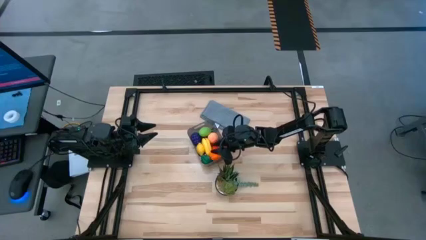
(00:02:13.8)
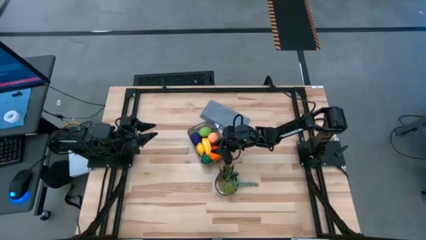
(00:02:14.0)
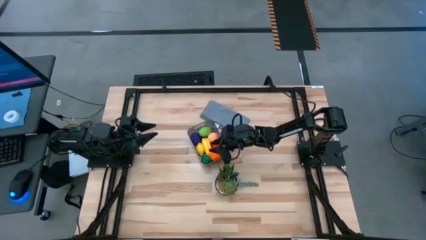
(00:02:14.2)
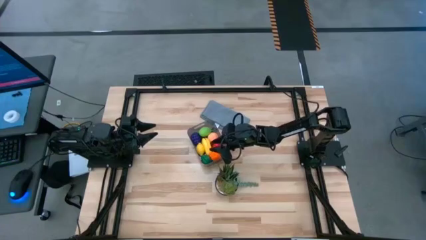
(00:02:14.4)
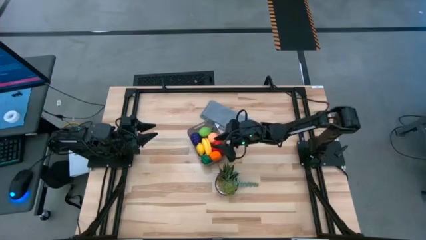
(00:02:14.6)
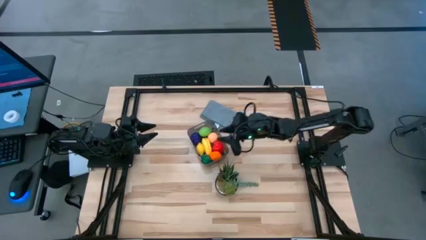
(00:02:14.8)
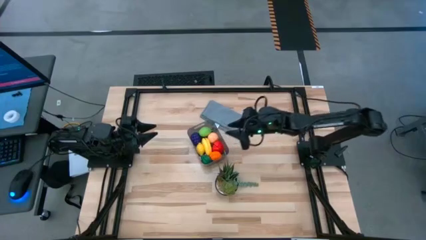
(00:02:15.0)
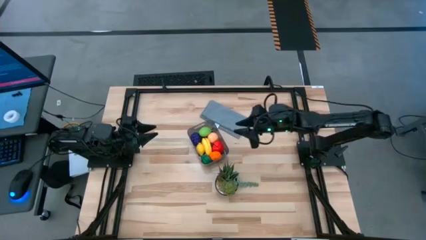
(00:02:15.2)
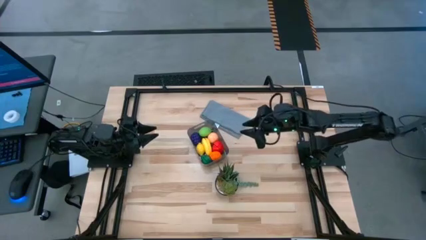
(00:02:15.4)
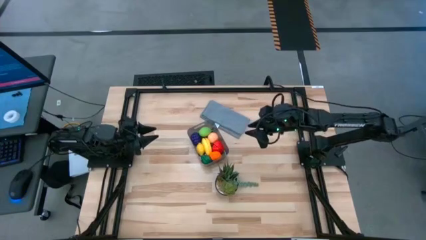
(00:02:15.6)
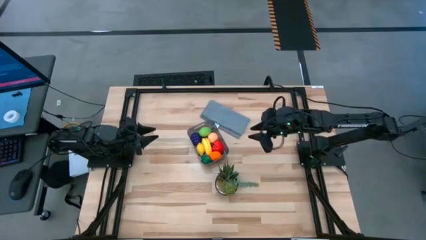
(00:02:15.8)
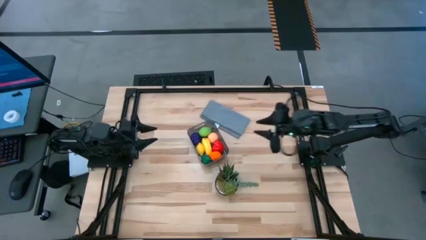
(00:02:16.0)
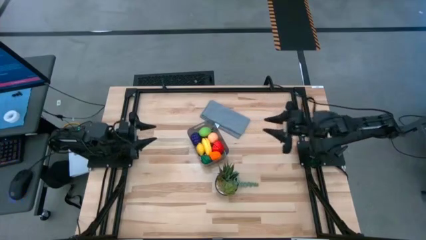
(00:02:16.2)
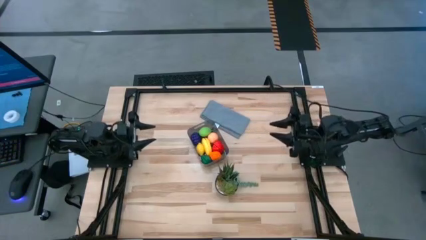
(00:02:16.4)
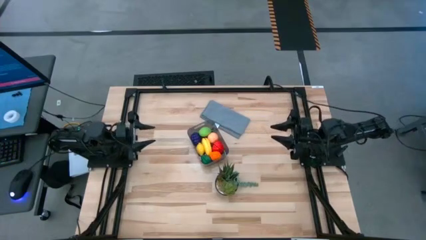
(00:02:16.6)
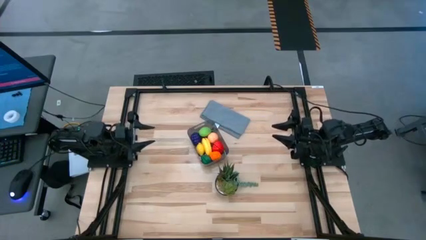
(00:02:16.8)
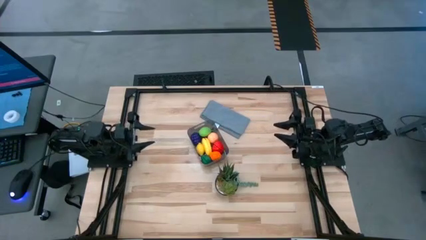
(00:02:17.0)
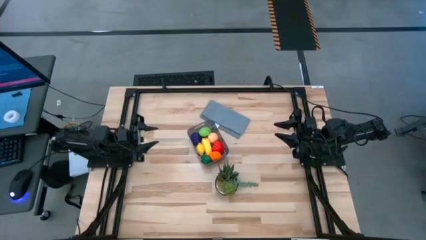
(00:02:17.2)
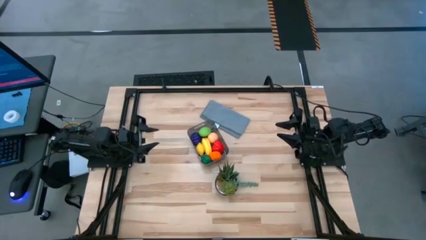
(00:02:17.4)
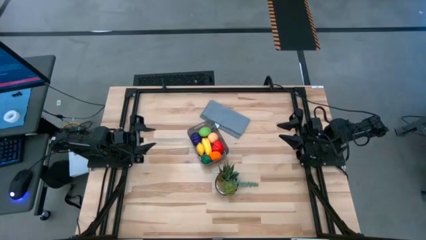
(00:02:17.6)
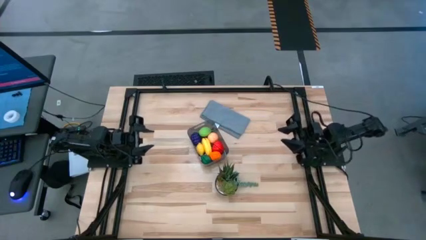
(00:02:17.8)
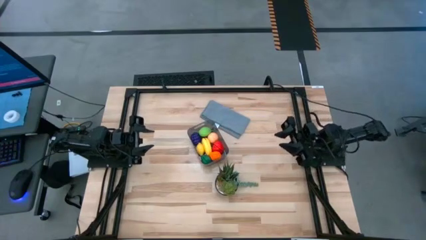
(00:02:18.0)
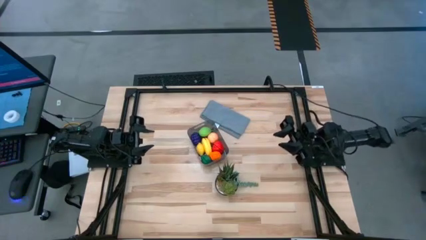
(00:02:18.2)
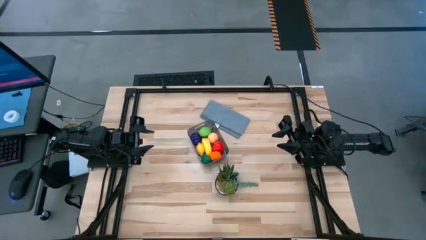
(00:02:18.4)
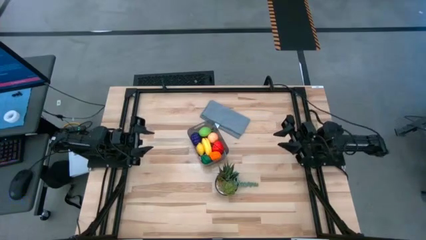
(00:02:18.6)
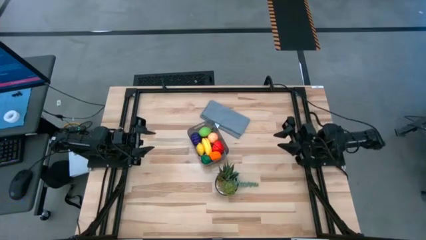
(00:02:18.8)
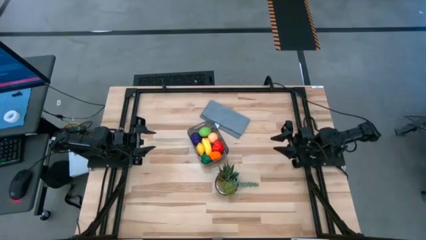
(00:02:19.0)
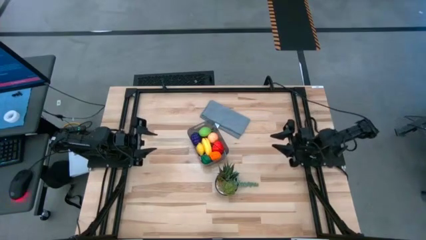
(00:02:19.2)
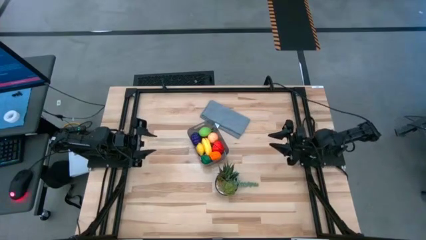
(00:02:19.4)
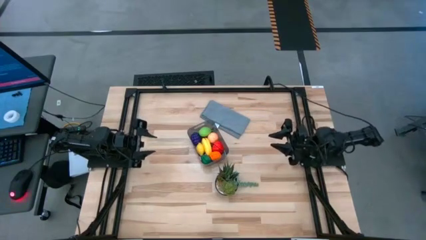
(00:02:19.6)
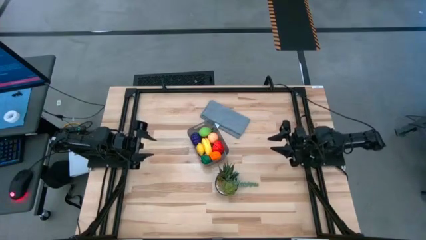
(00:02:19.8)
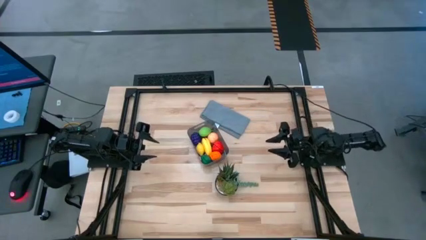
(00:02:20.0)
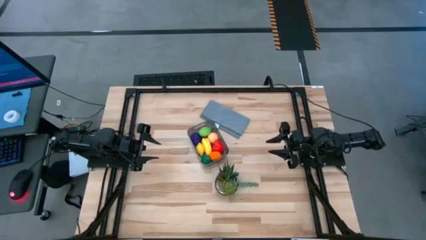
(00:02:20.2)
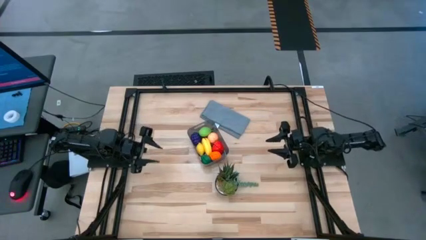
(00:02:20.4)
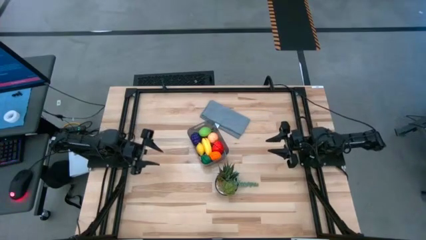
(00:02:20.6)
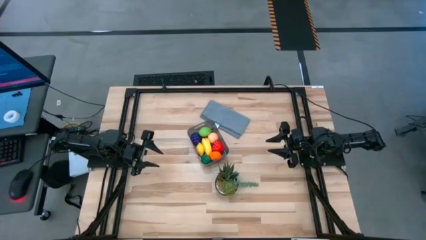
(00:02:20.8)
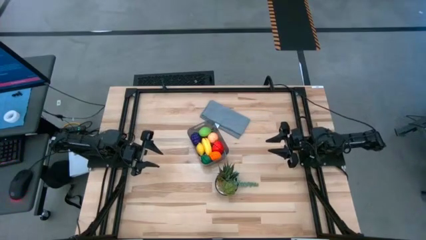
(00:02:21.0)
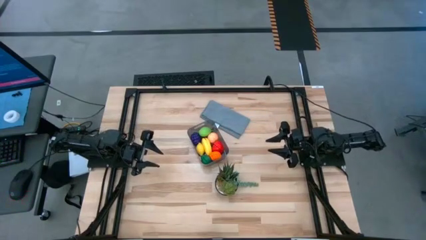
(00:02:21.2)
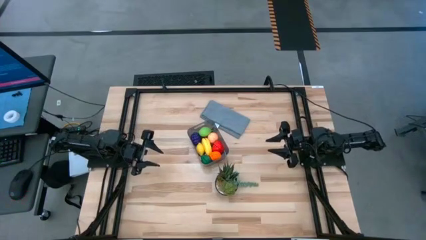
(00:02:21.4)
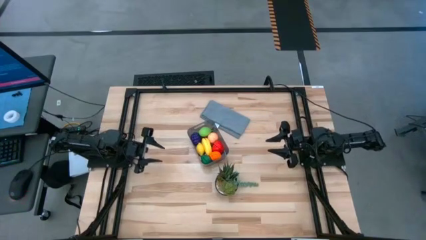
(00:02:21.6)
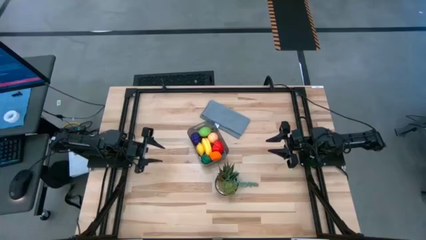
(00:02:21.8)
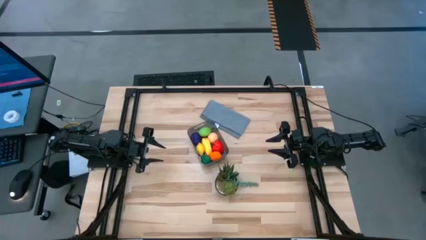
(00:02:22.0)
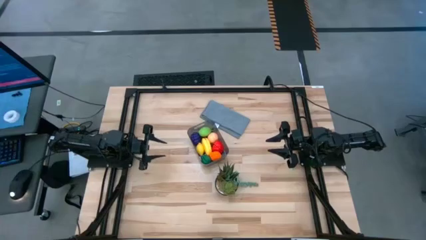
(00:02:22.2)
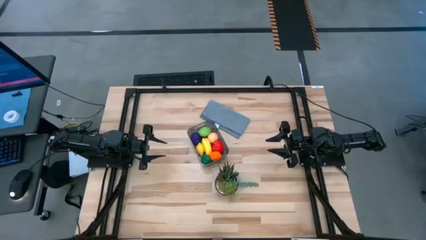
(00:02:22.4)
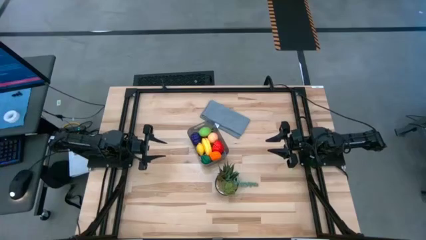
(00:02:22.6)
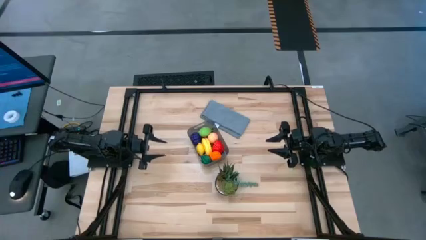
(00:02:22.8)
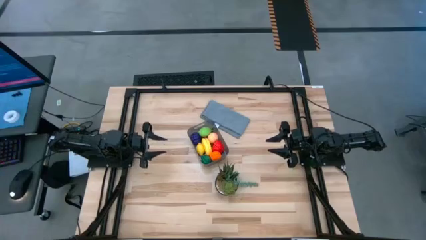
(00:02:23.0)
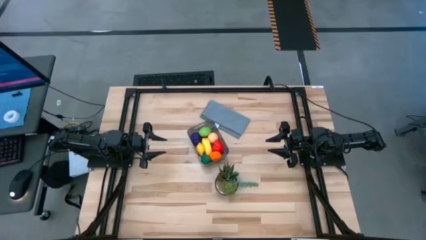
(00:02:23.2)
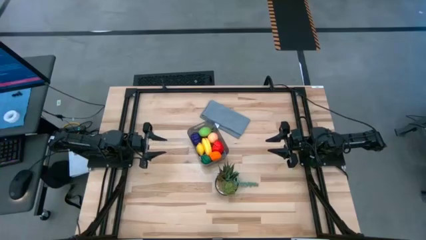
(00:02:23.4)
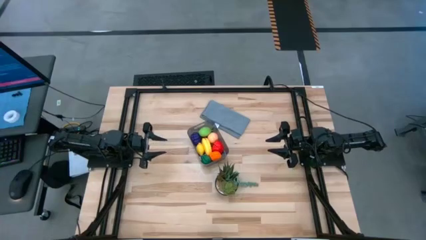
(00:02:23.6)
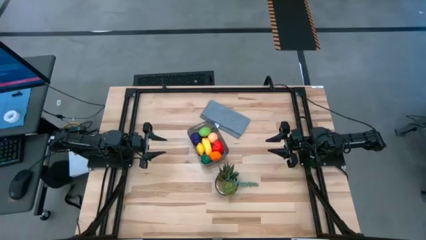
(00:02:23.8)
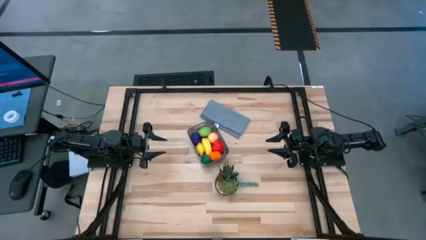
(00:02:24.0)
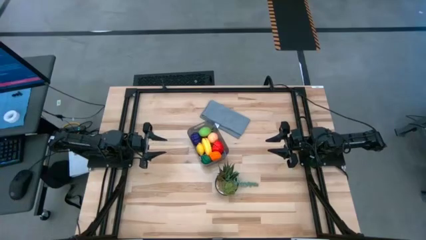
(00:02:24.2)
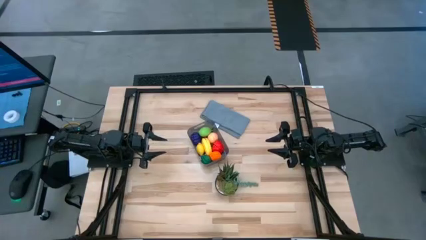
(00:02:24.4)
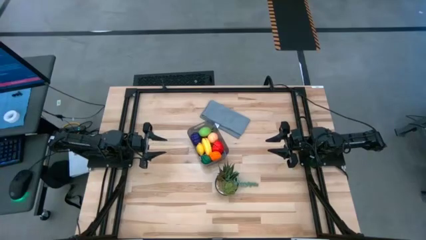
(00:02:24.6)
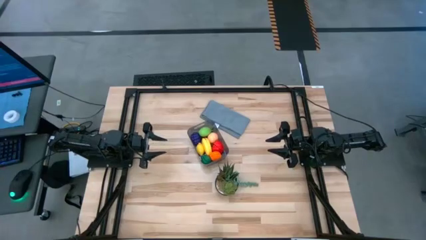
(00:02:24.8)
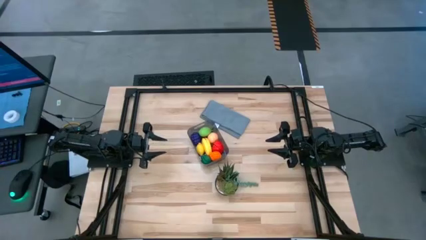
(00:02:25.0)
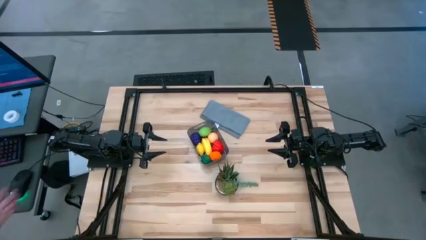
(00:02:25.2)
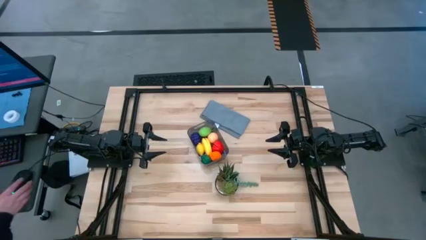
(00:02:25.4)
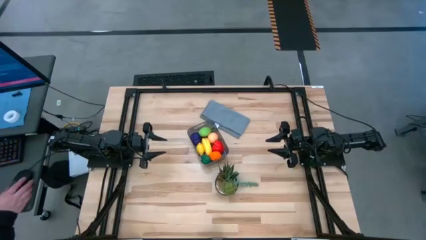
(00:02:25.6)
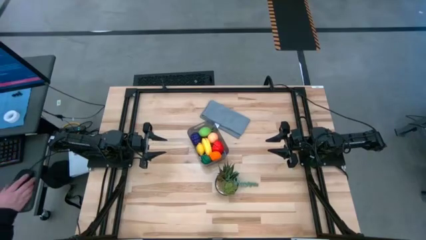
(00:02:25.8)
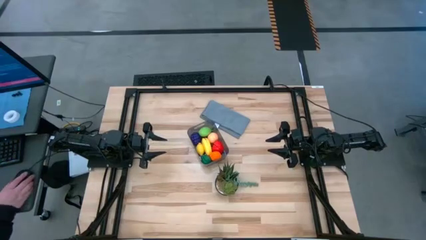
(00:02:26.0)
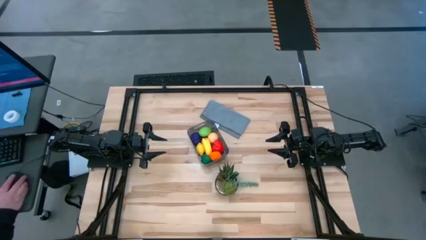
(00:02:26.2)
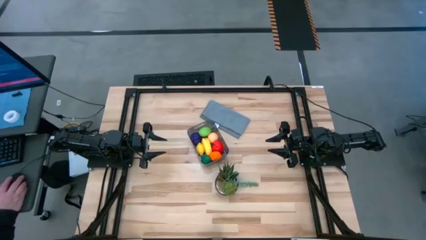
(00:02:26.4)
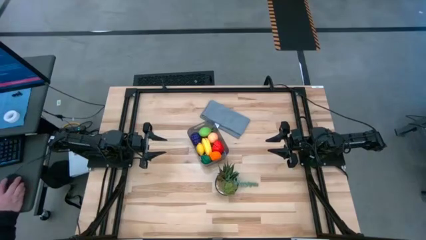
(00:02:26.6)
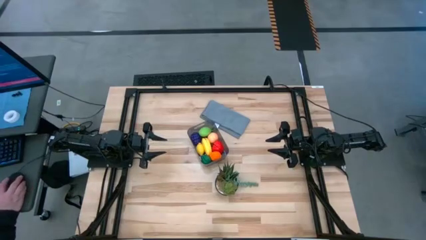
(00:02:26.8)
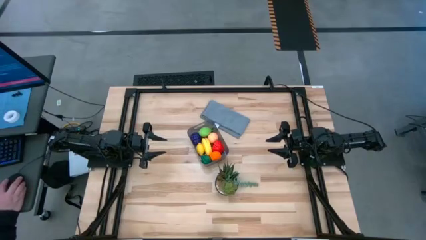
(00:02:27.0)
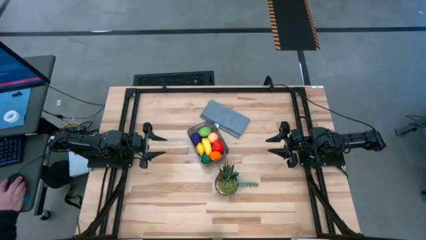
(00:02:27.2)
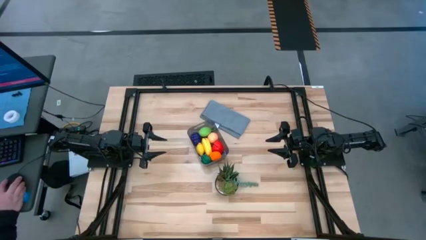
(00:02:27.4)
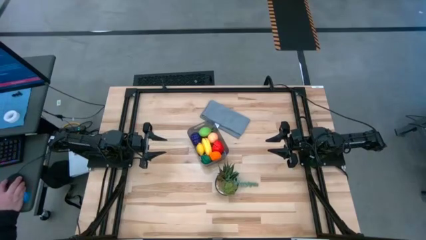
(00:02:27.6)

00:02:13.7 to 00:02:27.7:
Task: Pick and placing Produce into tupperware
Return to Home Position

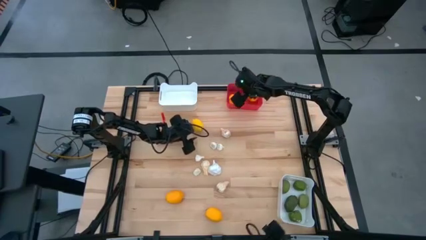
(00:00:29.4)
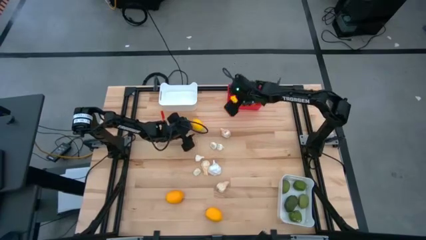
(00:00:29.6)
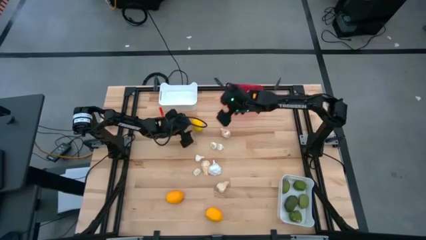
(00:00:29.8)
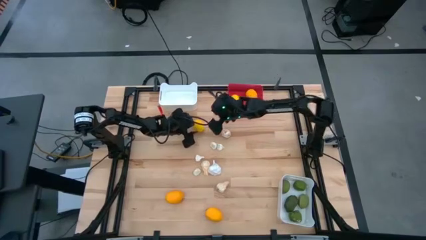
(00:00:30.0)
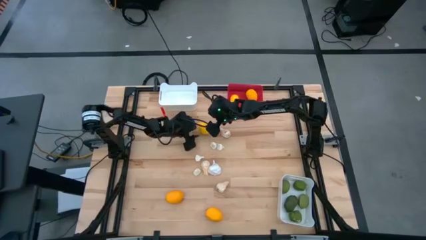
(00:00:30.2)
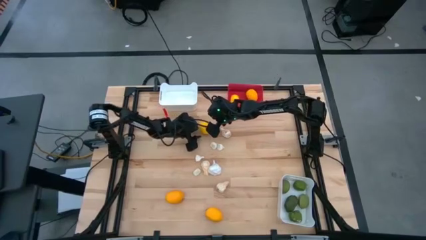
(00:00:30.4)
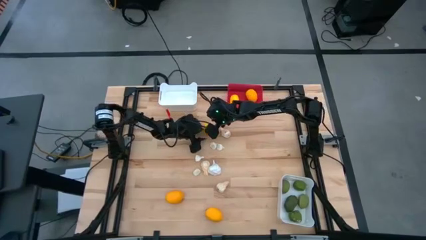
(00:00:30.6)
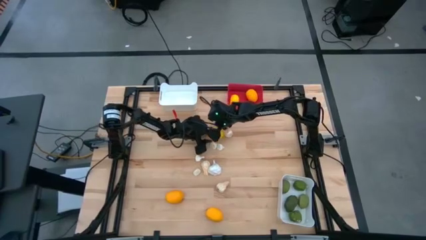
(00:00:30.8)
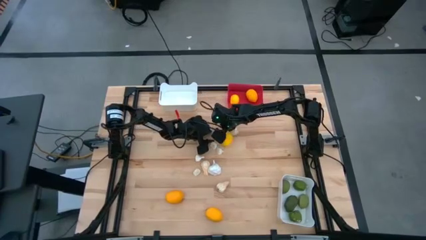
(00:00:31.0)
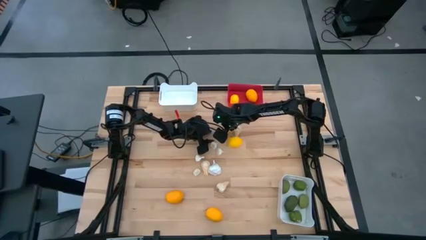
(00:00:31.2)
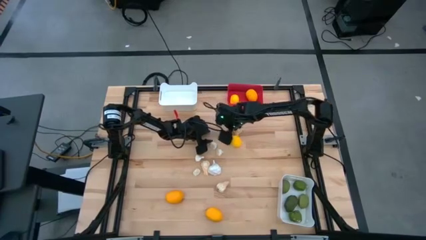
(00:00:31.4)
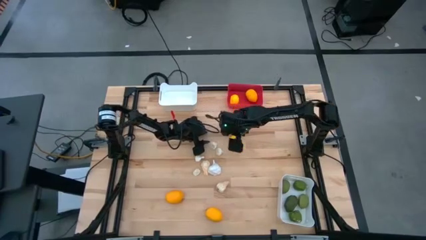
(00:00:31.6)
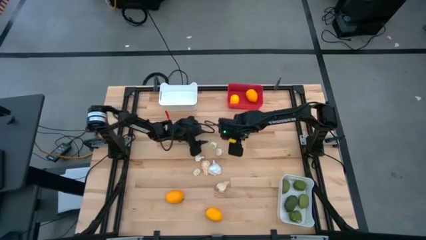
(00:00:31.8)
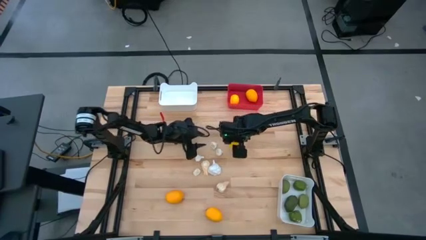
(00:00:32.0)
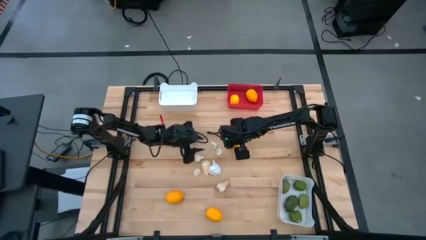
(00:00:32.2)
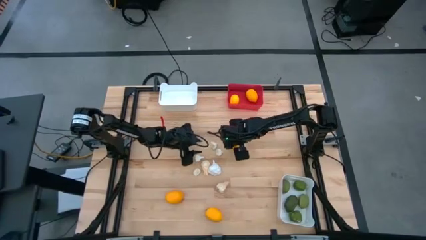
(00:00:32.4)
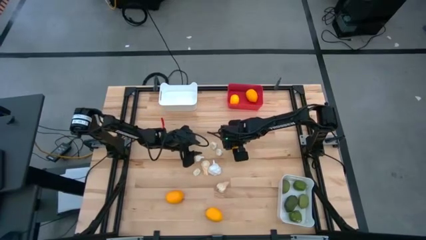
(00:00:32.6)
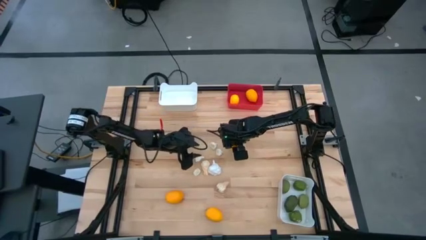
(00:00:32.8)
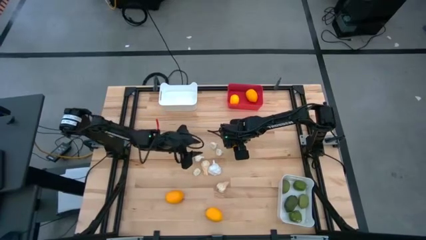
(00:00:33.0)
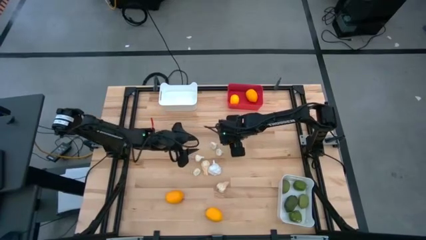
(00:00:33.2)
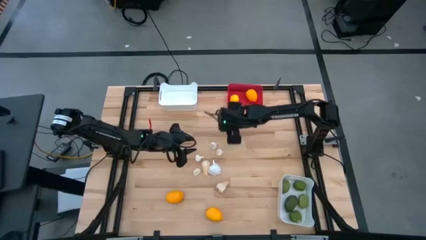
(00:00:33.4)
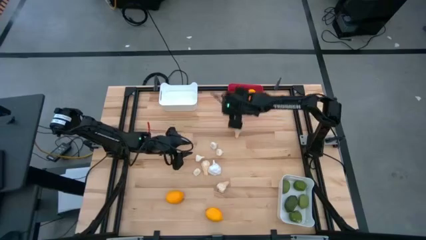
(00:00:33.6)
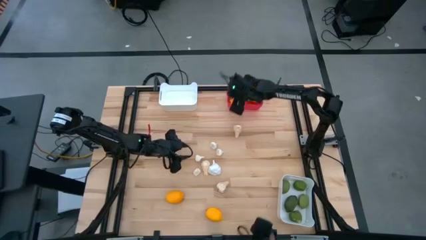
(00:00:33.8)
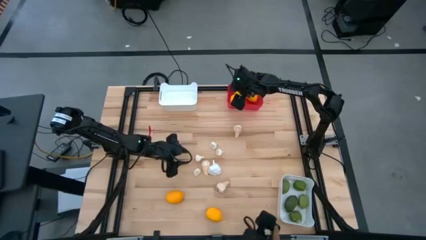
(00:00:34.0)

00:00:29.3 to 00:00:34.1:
Task: Sort produce into baskets
Put the yellow lemon into the red bin
